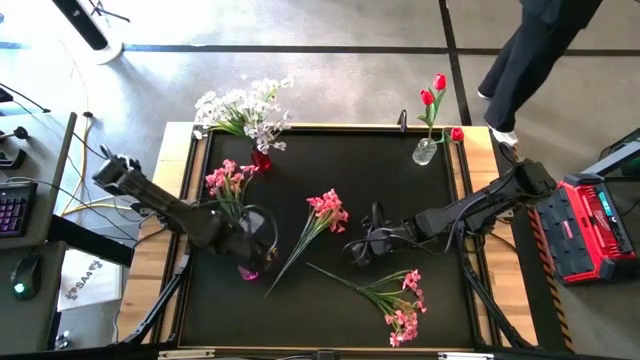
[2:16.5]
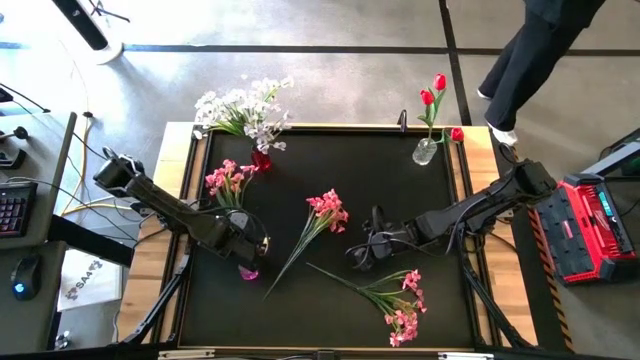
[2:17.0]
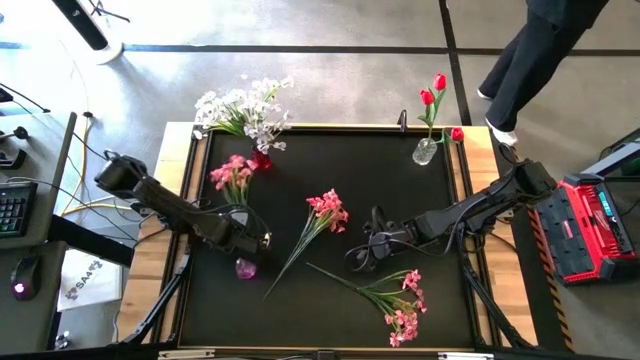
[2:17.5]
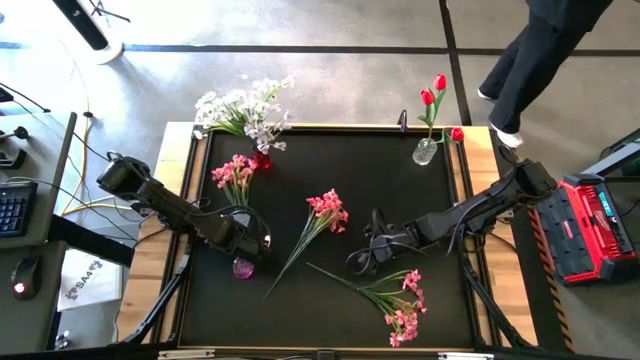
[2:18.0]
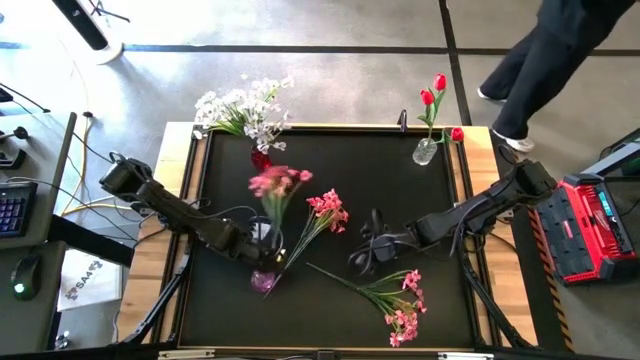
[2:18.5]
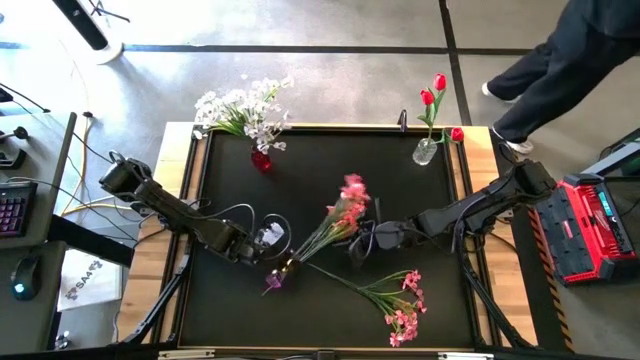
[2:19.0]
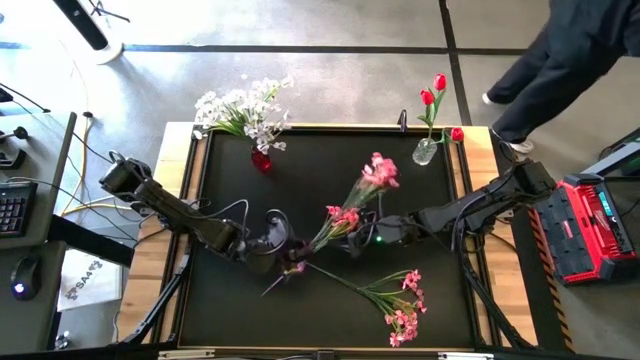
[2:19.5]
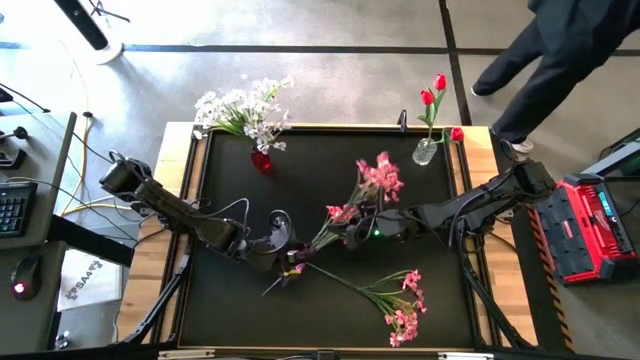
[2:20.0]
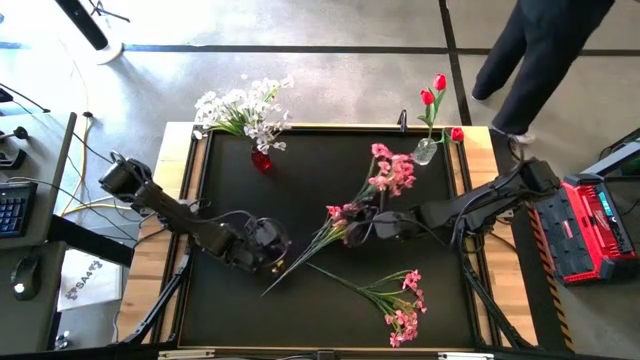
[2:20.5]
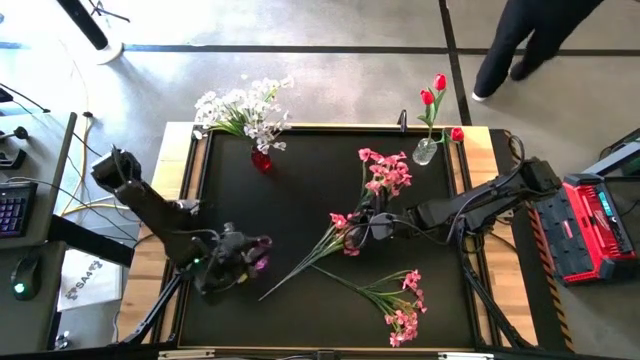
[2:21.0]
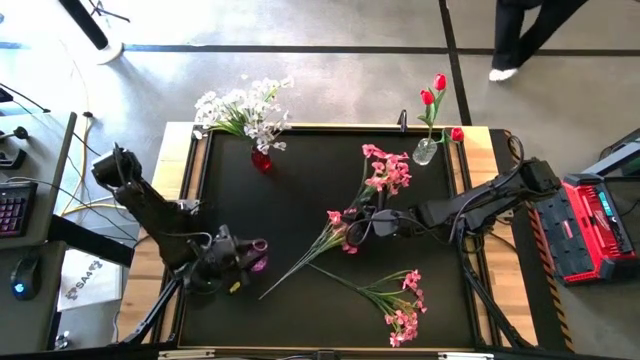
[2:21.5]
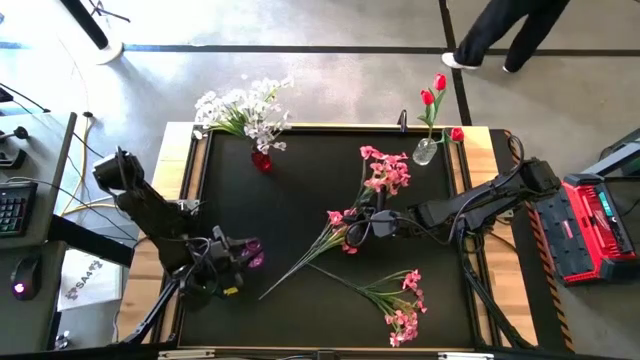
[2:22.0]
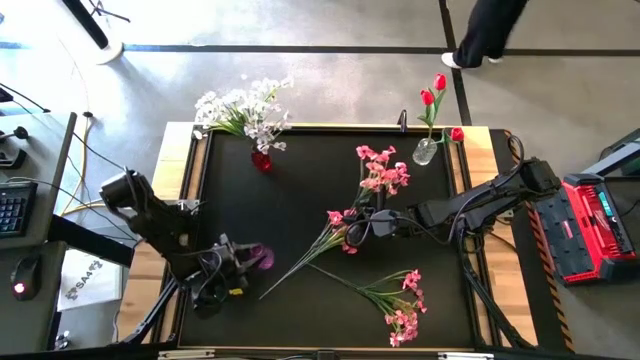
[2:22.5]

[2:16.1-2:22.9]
Task: Sort flowers into vase by color
Adjust the purple vase to an upright position

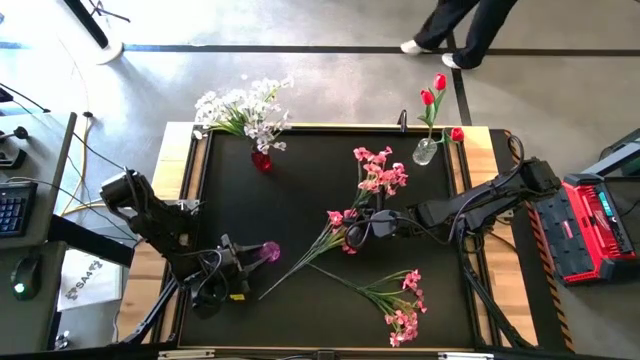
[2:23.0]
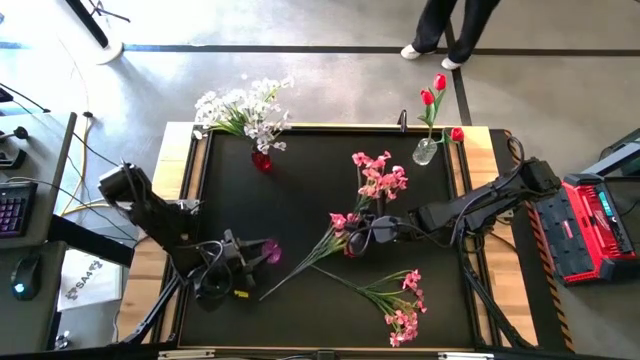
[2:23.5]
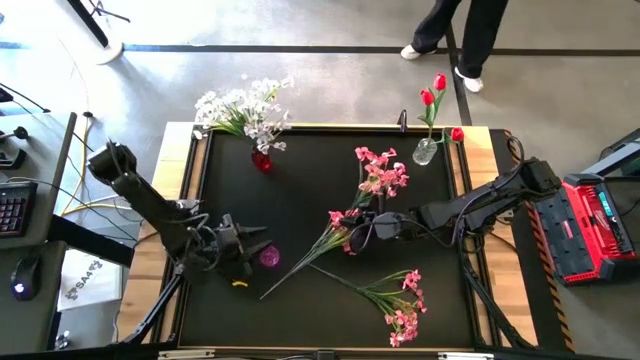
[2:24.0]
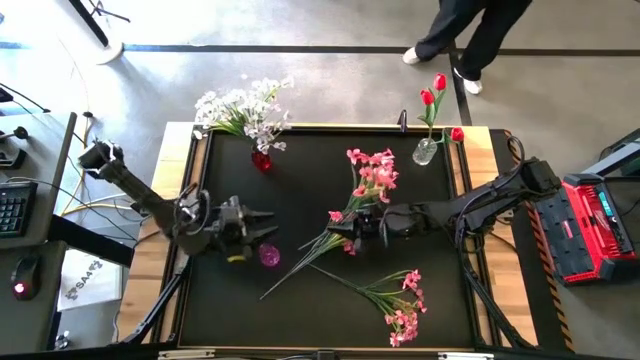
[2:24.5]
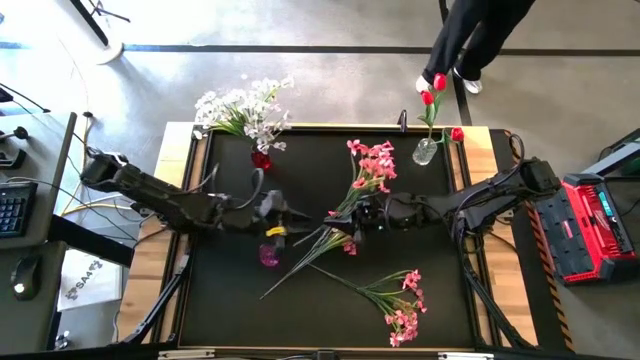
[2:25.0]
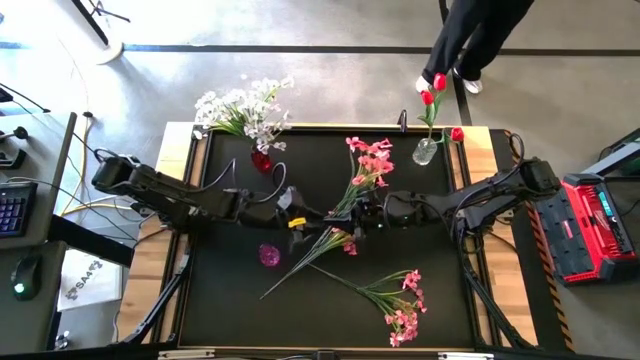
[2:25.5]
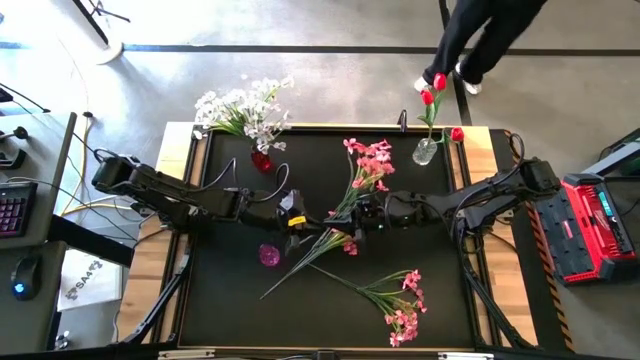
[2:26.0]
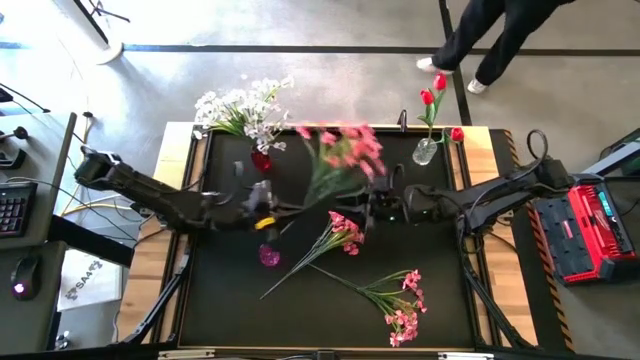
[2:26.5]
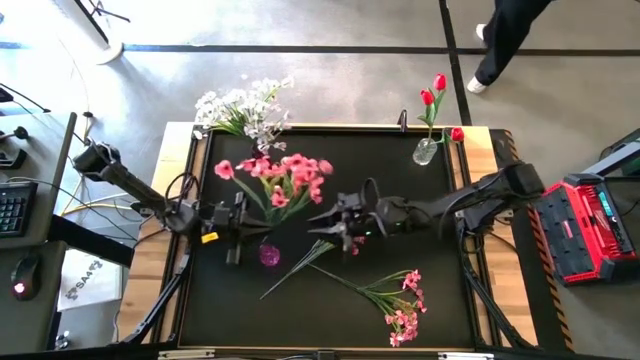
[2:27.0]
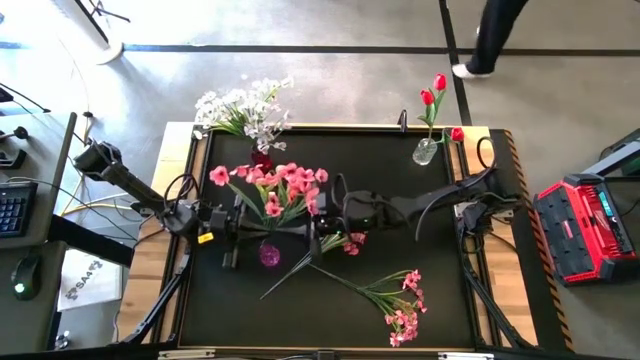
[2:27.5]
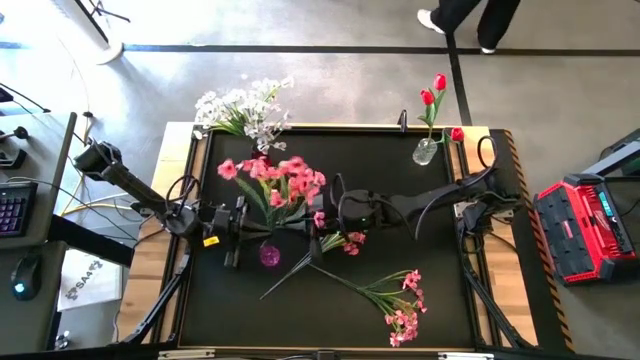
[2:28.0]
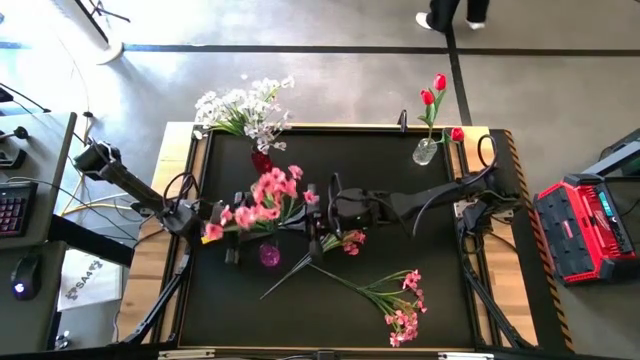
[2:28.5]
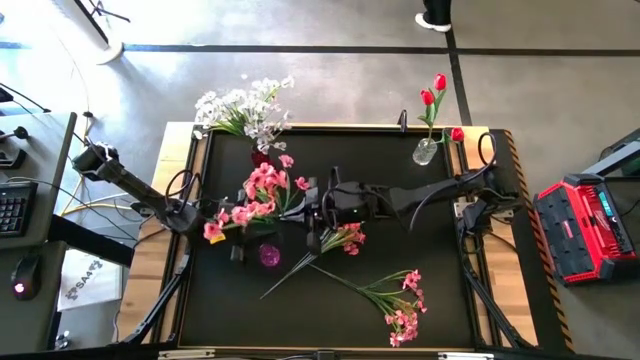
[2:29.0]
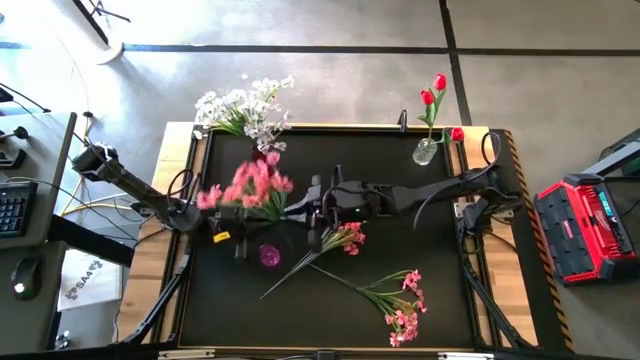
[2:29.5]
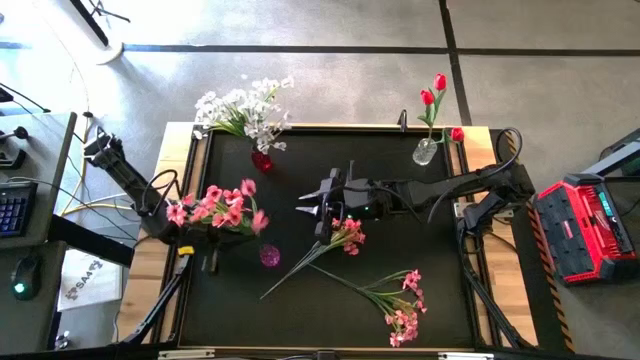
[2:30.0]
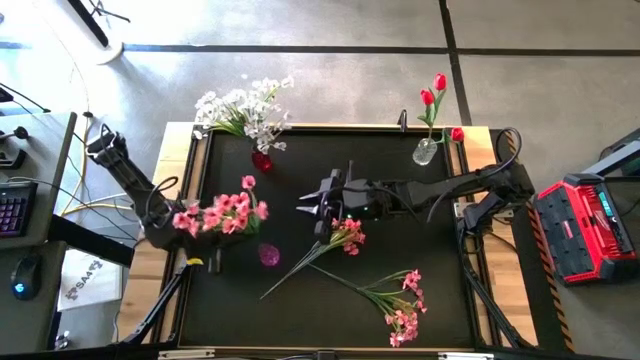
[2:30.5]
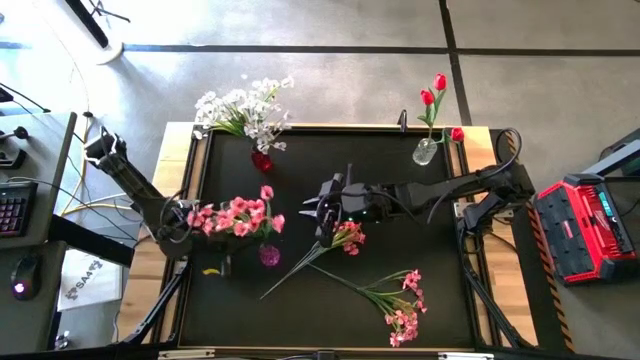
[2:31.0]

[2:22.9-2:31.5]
Put the left pink flowers into the purple vase

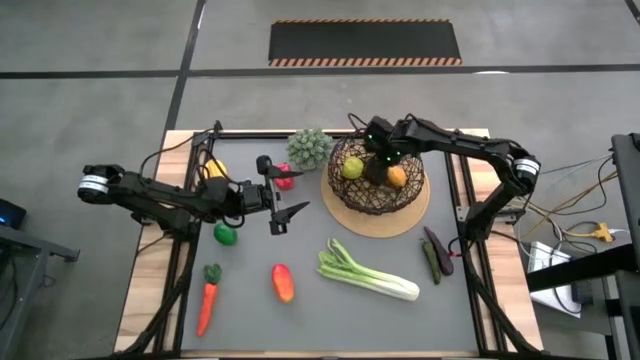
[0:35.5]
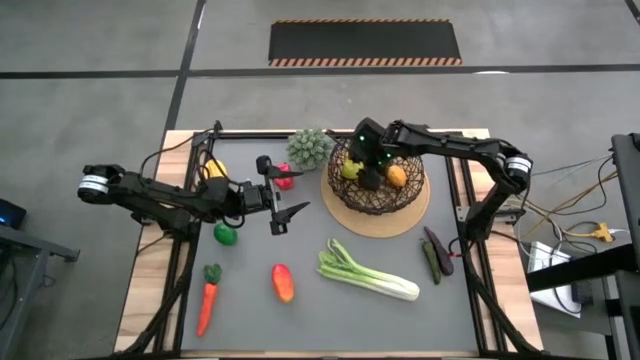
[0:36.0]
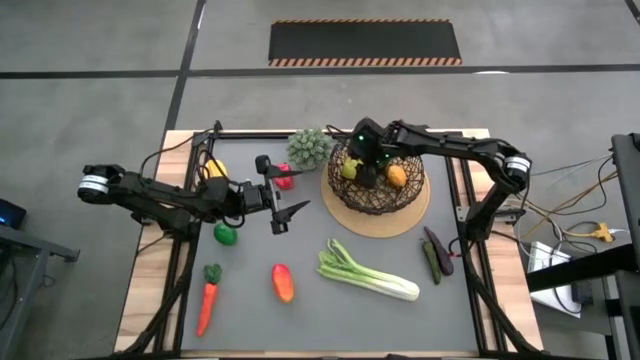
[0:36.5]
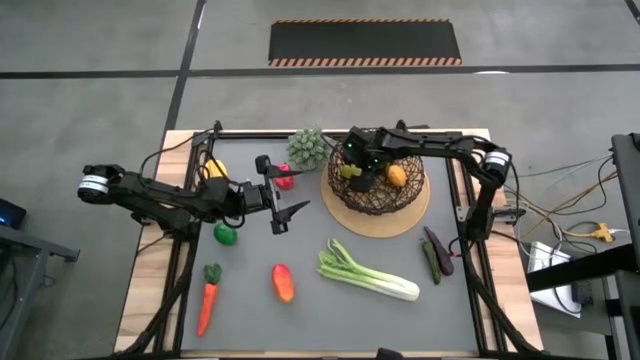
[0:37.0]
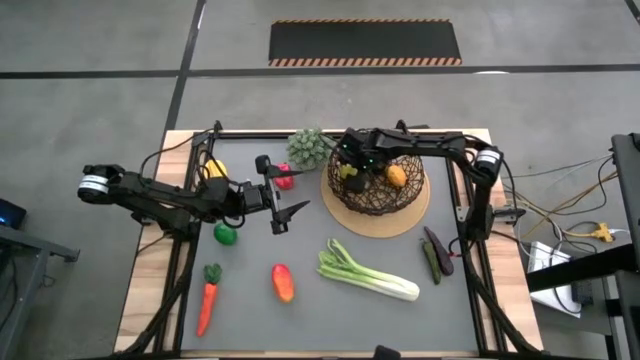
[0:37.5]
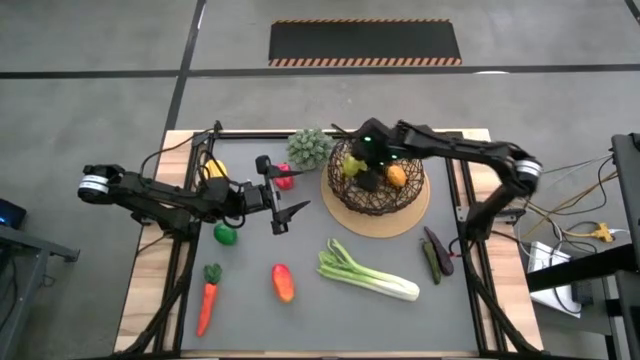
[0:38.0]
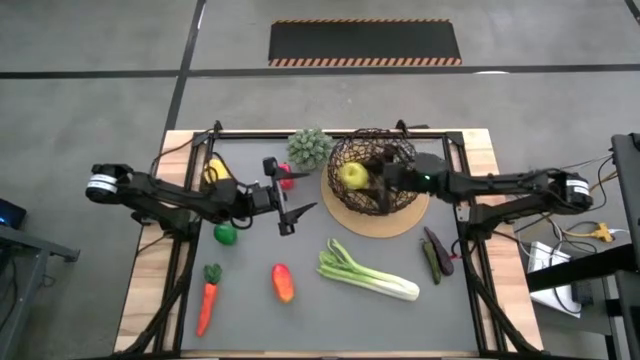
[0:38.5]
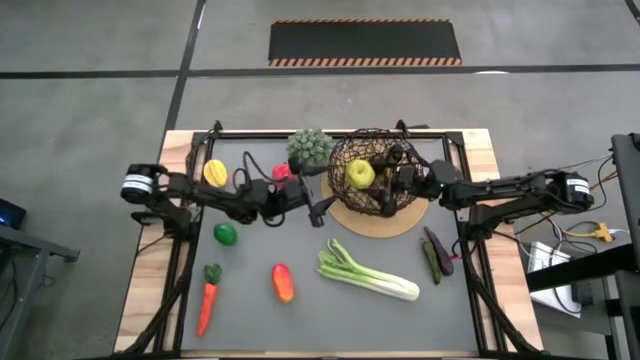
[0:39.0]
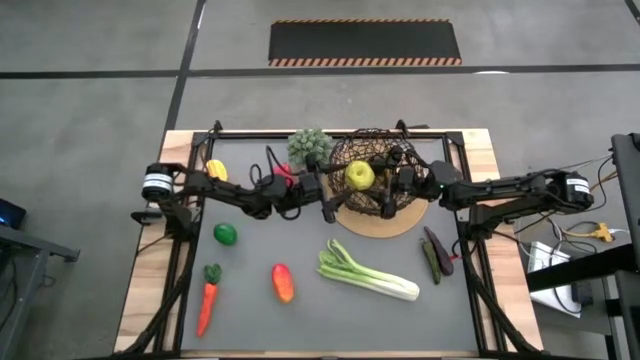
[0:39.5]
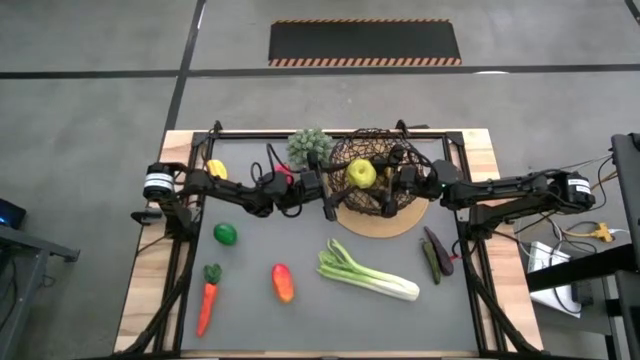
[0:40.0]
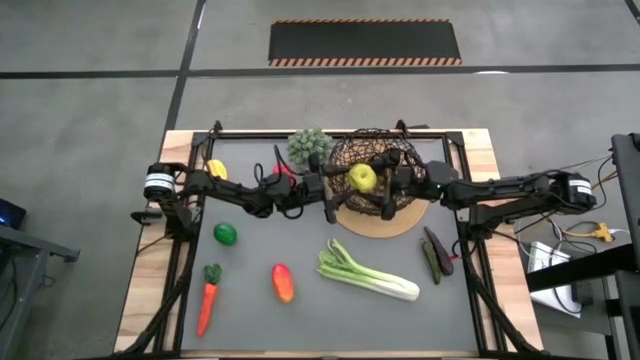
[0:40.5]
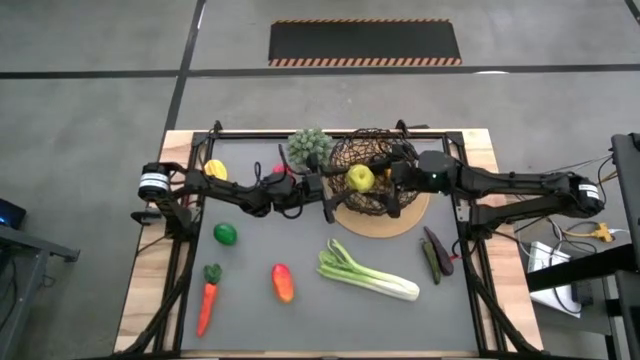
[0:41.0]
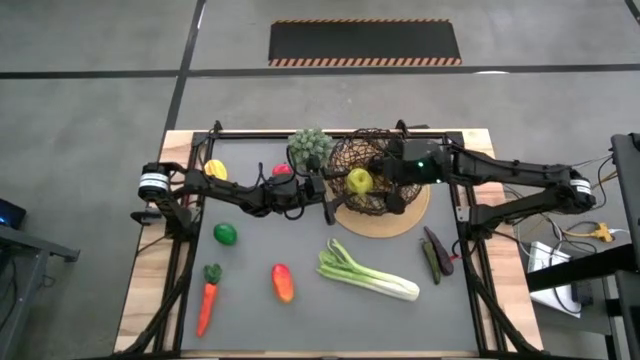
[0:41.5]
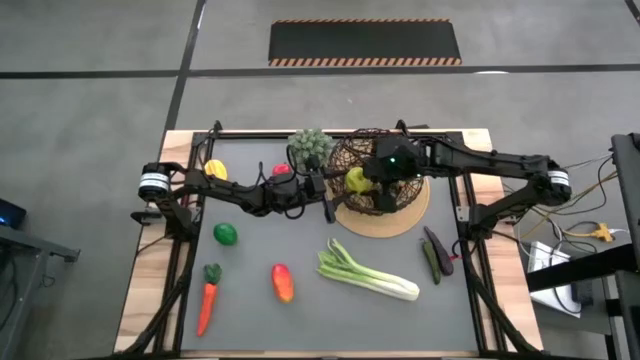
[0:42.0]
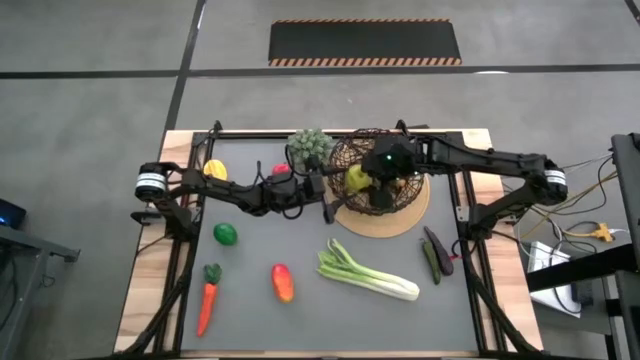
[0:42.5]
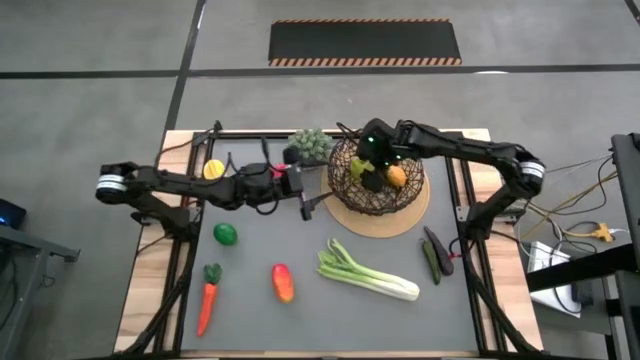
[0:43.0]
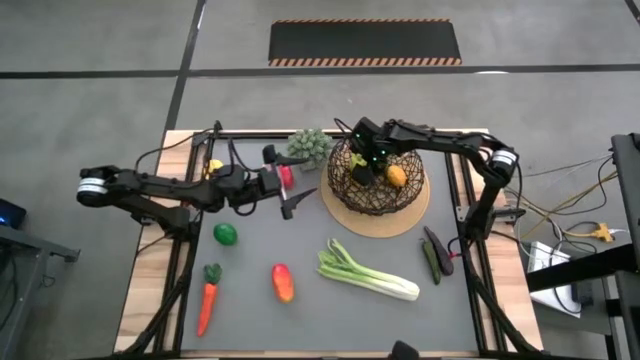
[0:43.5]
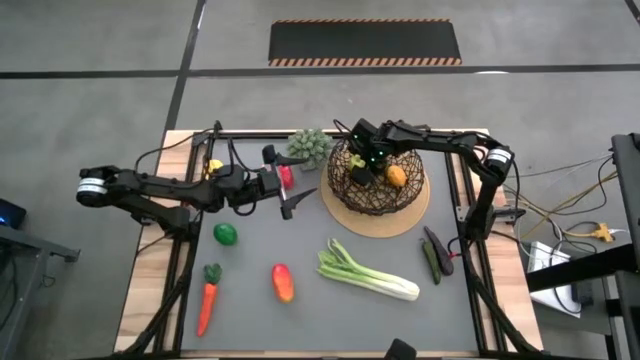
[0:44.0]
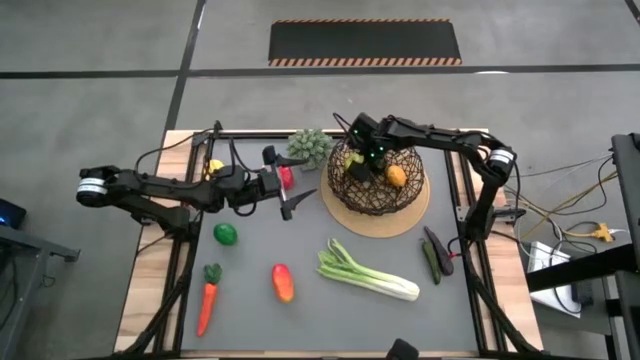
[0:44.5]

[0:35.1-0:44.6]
Task: Build produce basket
Adjust the green apple in the black wire basket
